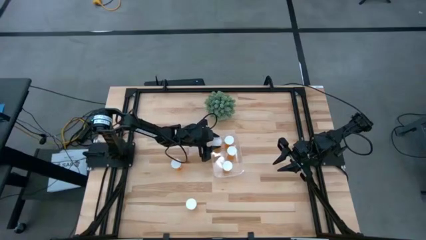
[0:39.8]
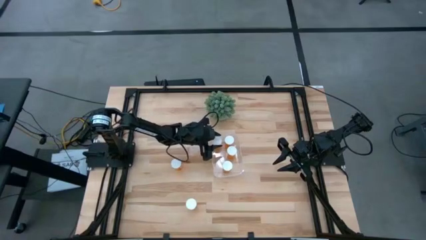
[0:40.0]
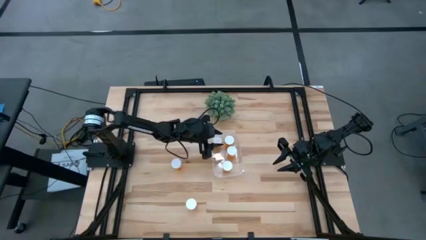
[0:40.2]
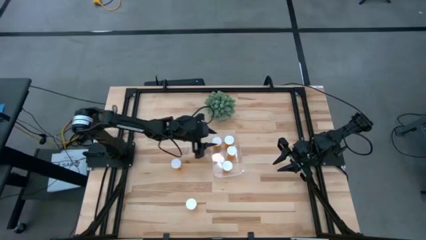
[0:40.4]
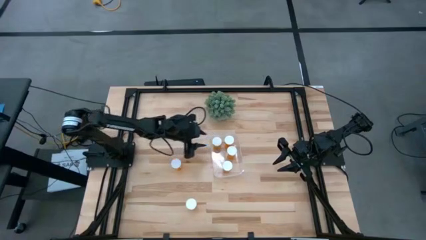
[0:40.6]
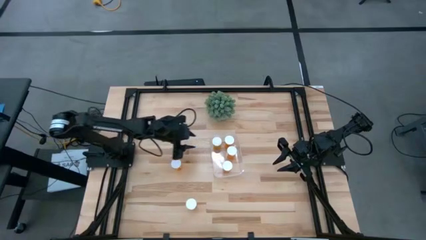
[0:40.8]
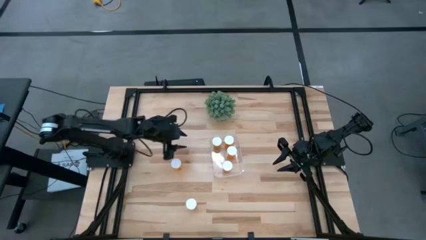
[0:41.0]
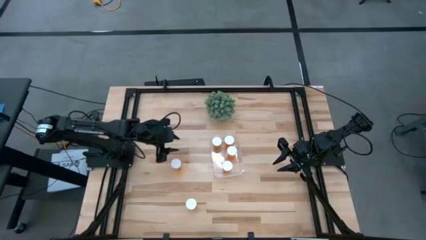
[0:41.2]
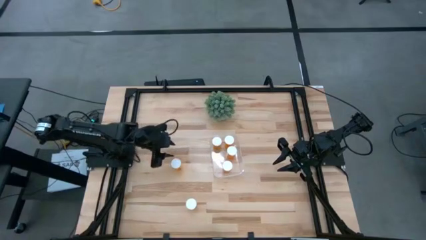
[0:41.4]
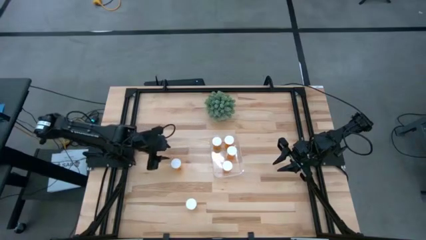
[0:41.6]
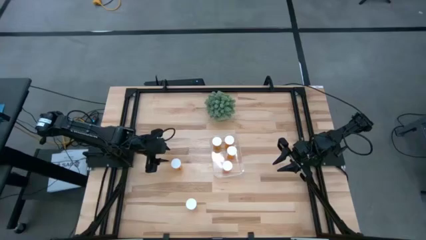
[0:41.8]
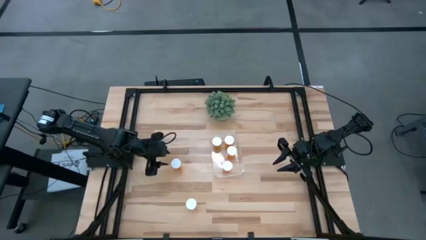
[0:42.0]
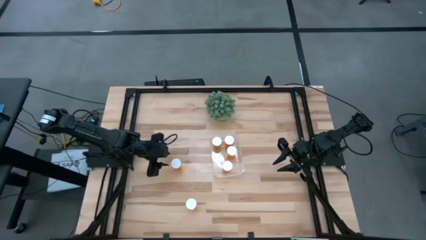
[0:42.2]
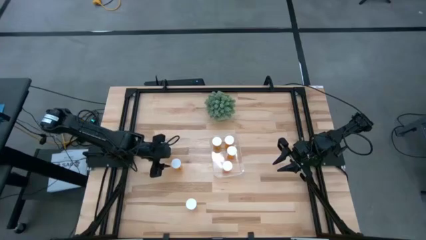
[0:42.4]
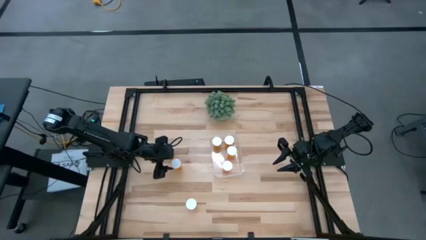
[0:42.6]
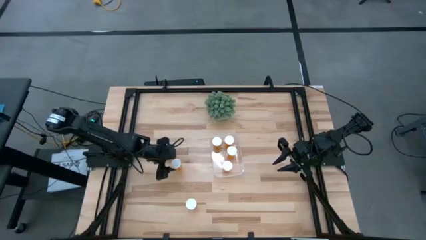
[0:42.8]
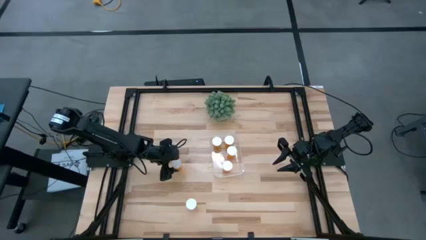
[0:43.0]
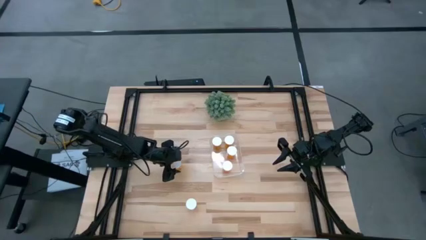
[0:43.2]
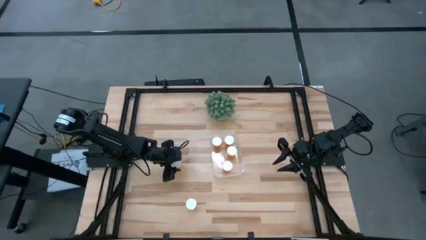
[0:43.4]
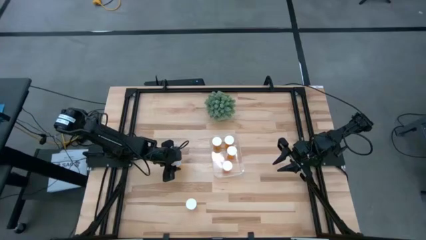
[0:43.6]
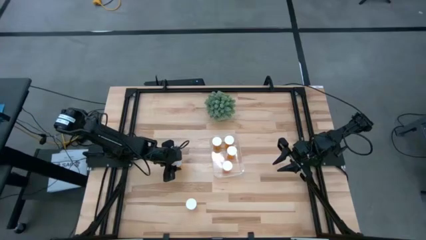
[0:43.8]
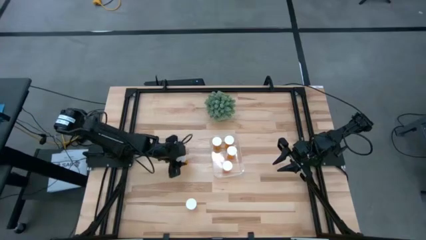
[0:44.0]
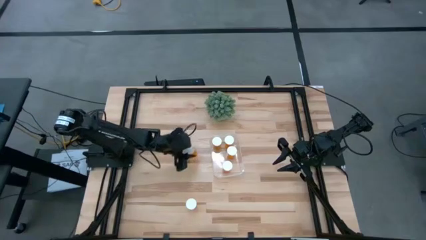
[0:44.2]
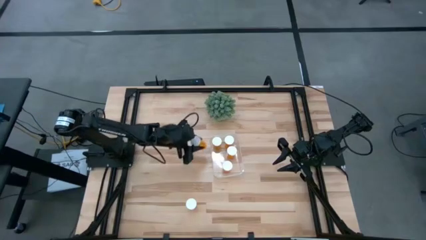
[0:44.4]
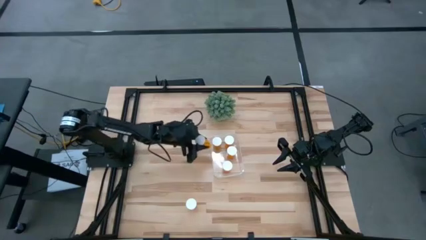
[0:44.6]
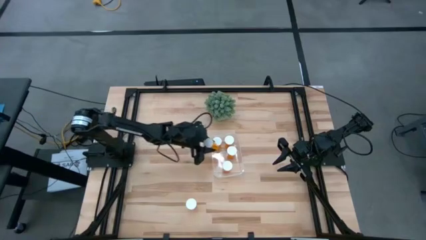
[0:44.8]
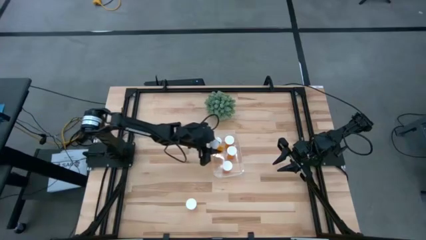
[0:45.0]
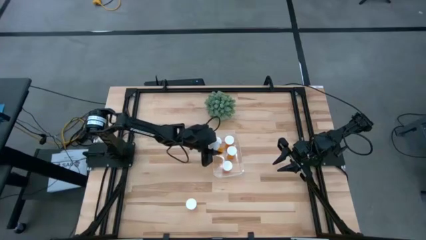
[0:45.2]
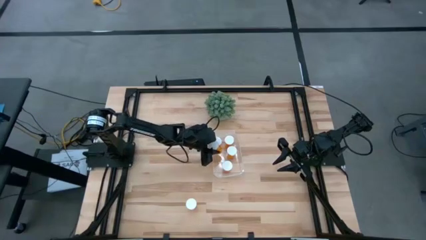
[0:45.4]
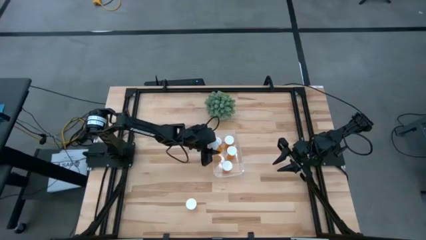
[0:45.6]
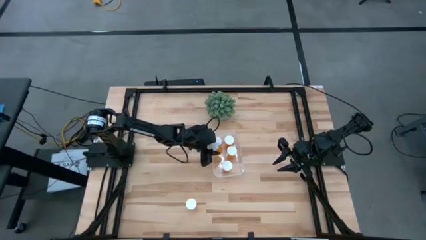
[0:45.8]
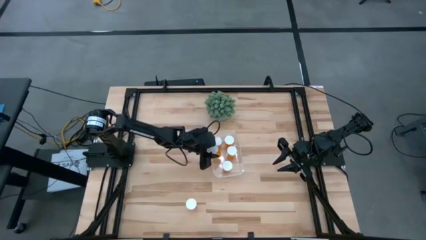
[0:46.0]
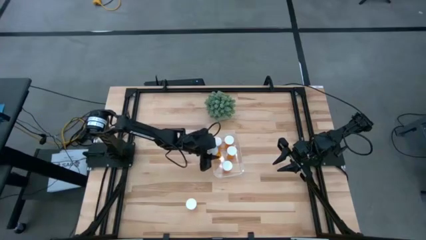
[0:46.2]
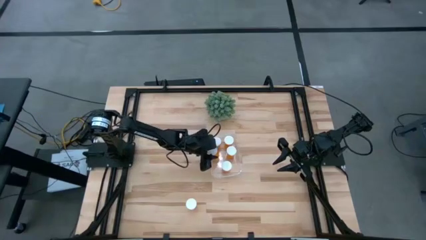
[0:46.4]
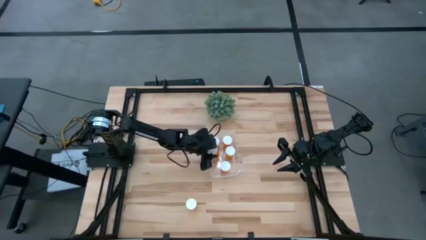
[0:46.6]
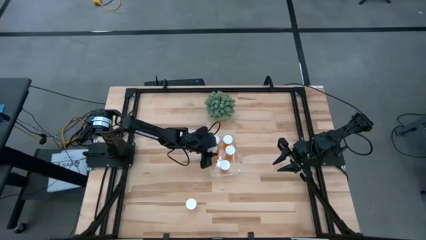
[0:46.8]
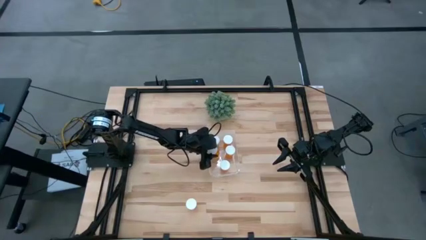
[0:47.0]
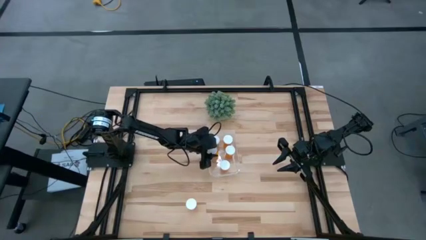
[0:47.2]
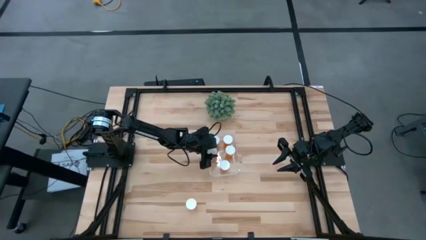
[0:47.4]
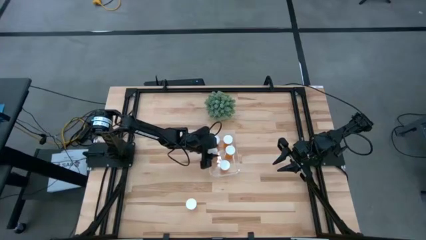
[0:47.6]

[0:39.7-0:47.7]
Task: Pick and place pill bottles into a basket
Put the orange pill bottle into the transparent bin

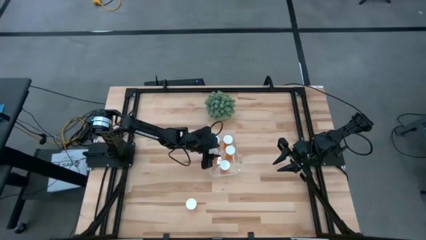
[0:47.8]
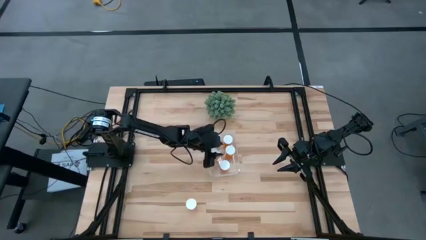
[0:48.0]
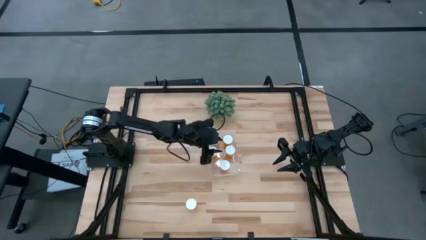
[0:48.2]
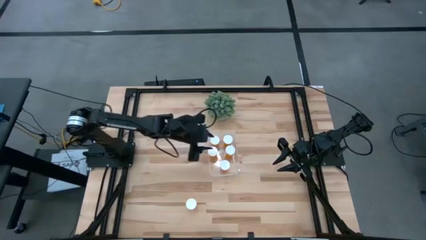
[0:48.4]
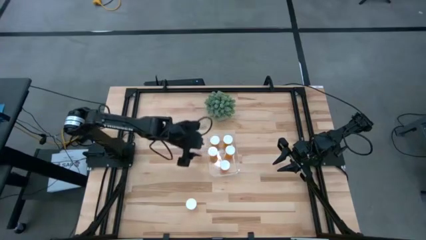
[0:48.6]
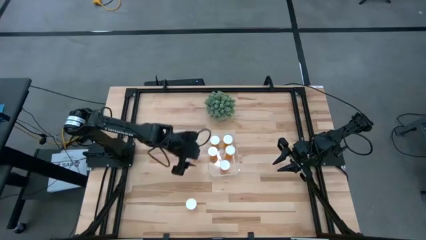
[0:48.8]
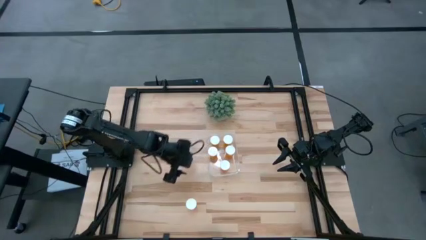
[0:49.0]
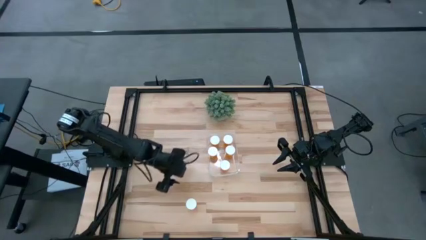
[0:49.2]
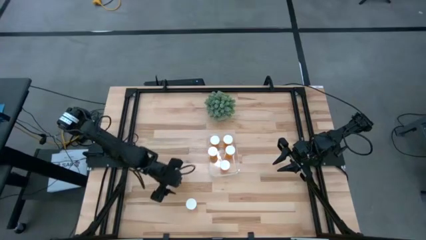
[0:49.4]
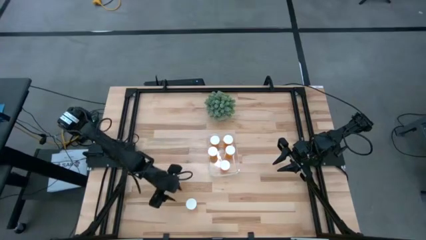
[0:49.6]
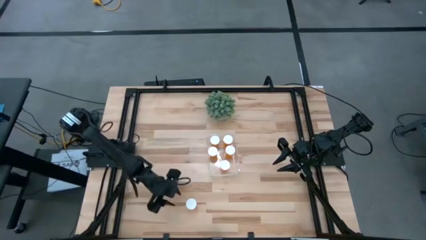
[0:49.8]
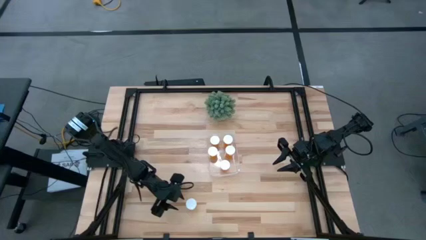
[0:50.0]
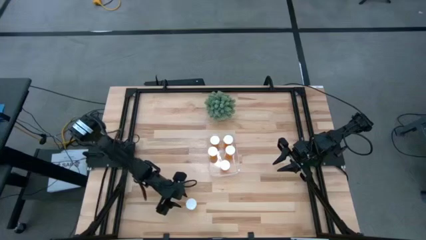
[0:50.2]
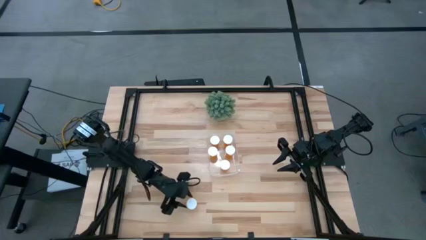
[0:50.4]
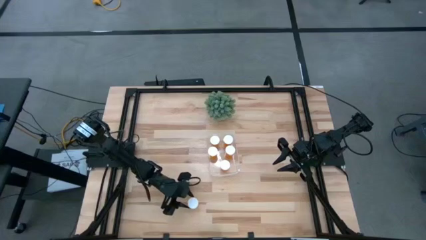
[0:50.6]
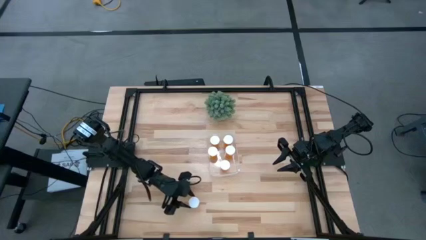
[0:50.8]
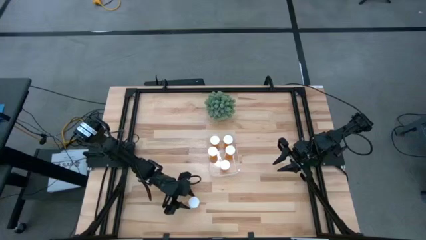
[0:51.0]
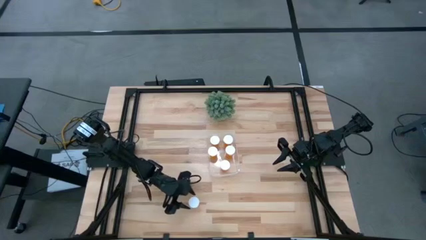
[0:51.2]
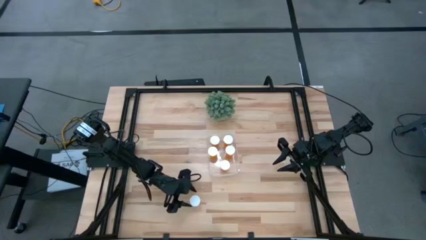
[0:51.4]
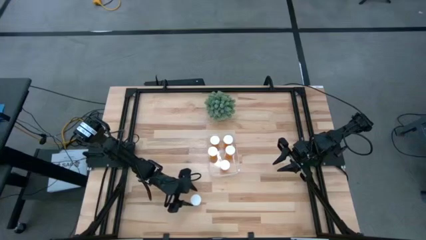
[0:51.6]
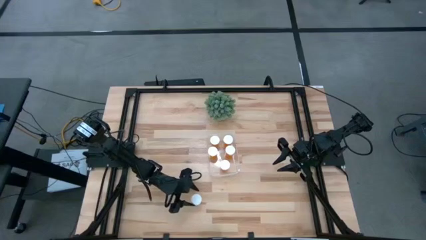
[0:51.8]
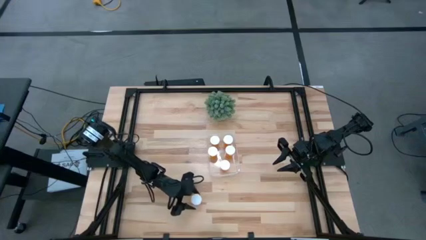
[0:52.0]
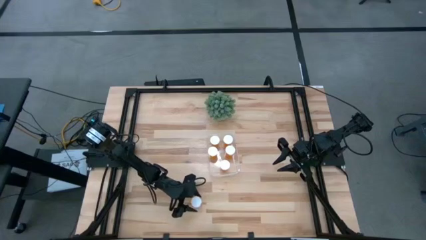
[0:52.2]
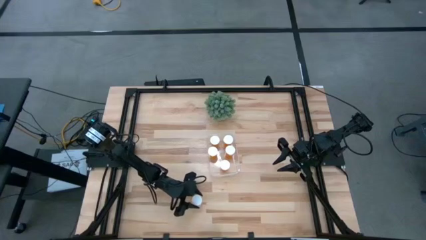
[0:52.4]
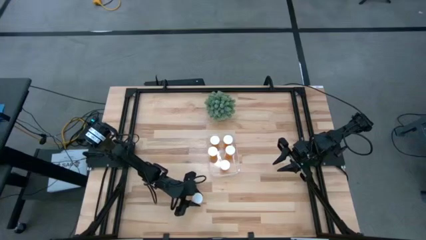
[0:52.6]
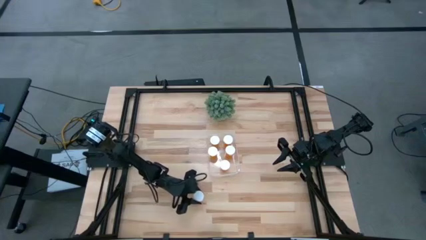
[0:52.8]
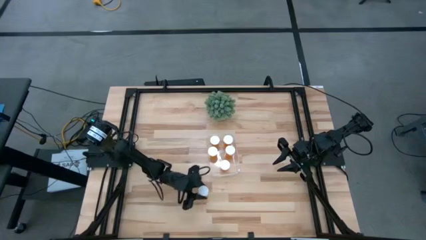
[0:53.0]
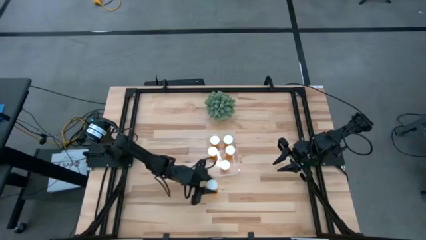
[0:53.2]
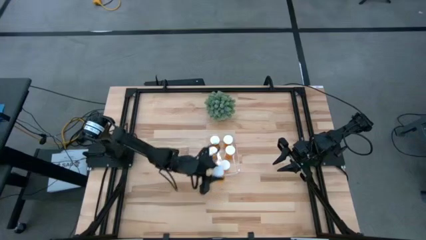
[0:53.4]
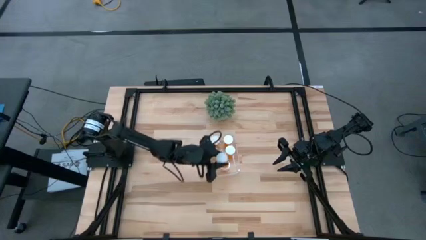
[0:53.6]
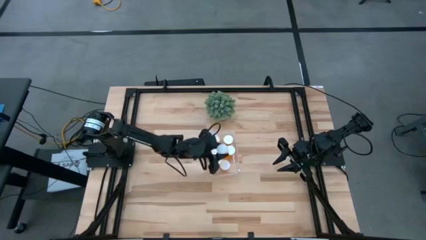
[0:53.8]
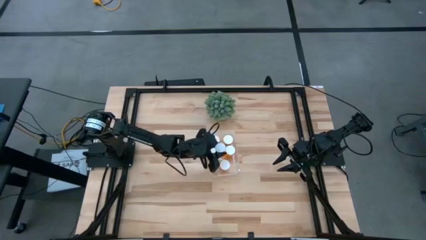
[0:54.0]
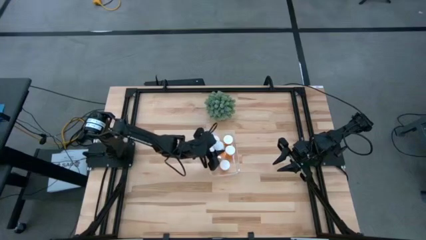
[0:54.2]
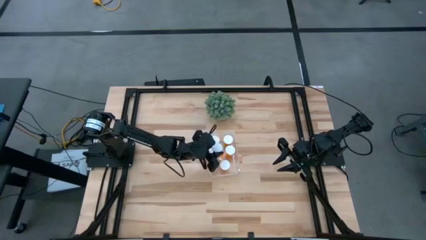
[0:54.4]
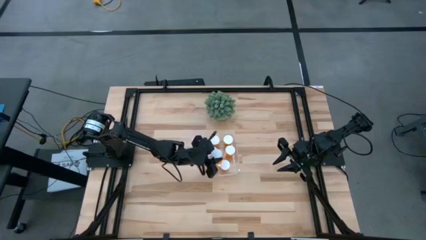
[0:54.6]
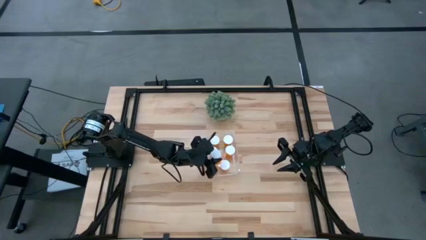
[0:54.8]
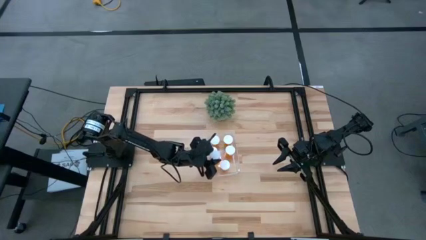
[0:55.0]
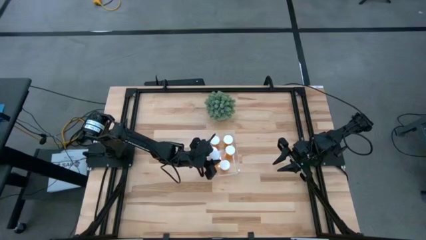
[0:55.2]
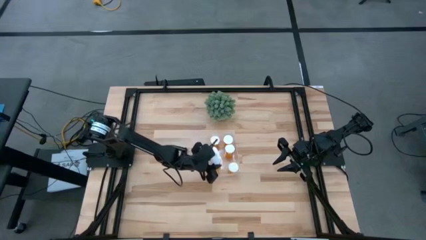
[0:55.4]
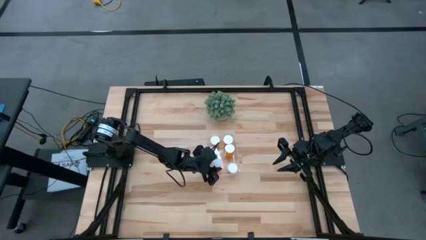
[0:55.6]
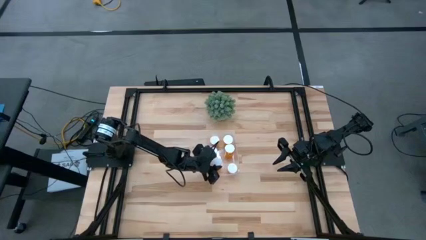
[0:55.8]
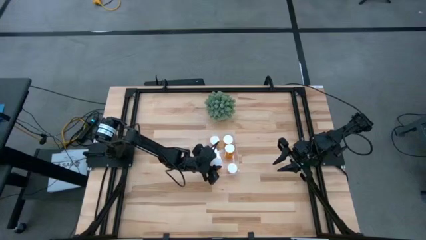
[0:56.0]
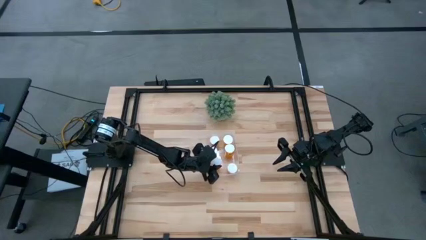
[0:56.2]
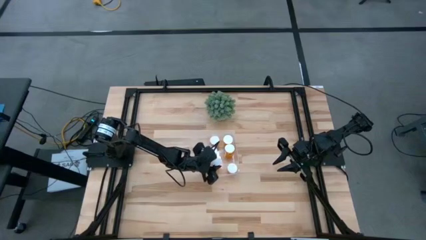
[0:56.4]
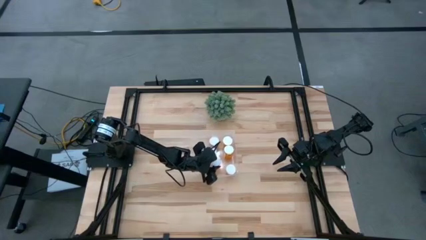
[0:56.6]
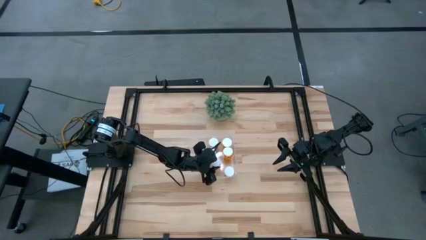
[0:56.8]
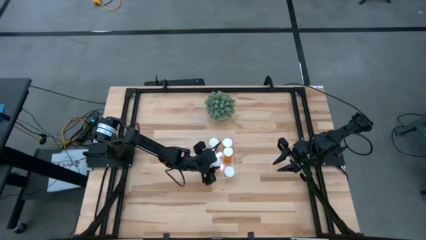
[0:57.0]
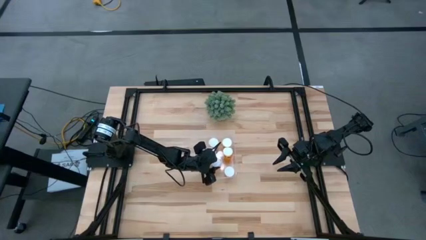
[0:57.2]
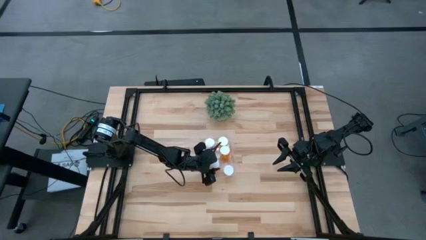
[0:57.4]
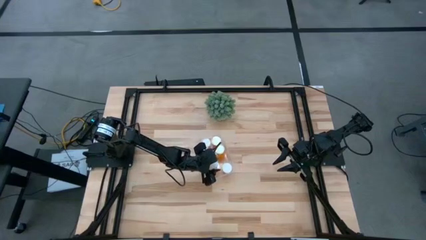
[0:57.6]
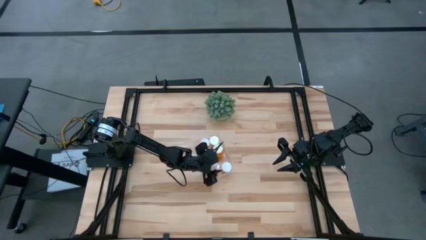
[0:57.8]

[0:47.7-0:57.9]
Put the orange pill bottle into the transparent bin
